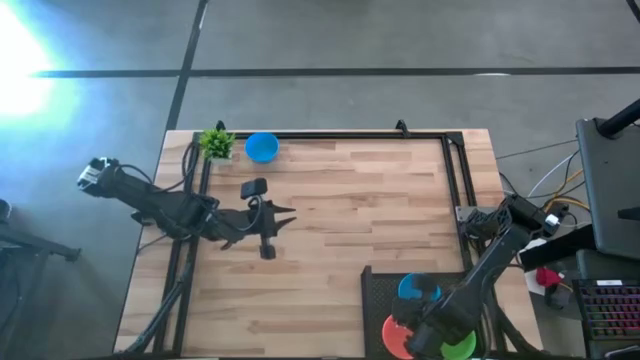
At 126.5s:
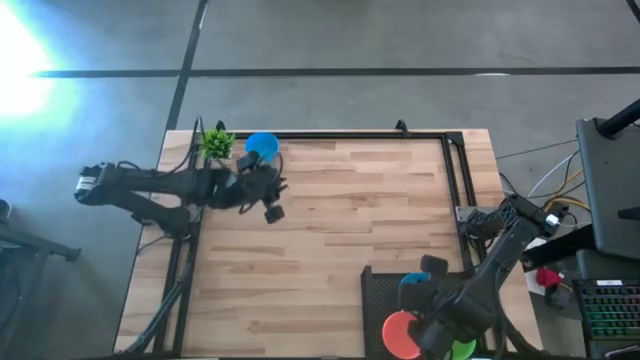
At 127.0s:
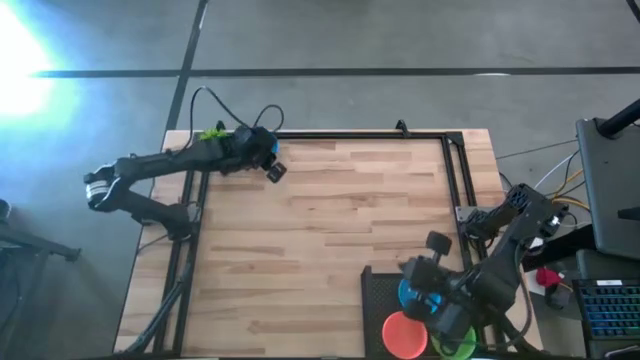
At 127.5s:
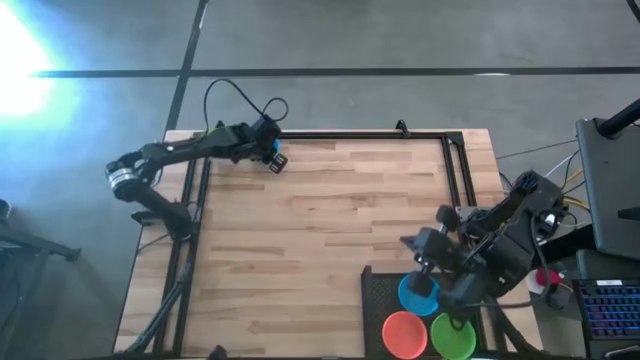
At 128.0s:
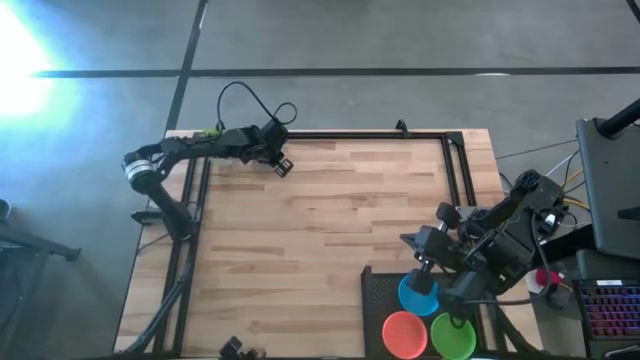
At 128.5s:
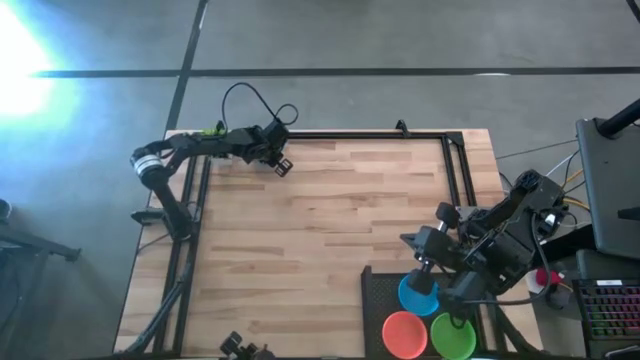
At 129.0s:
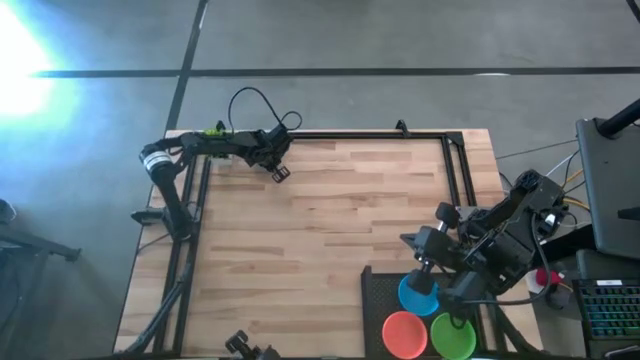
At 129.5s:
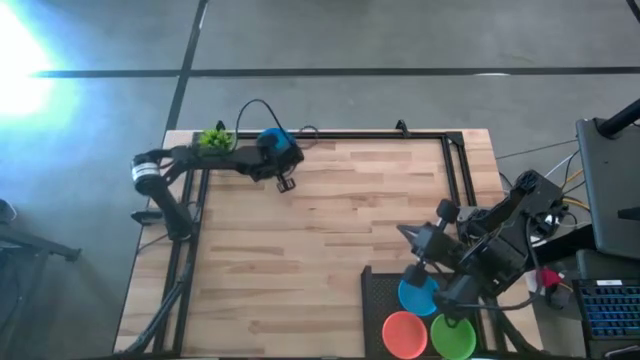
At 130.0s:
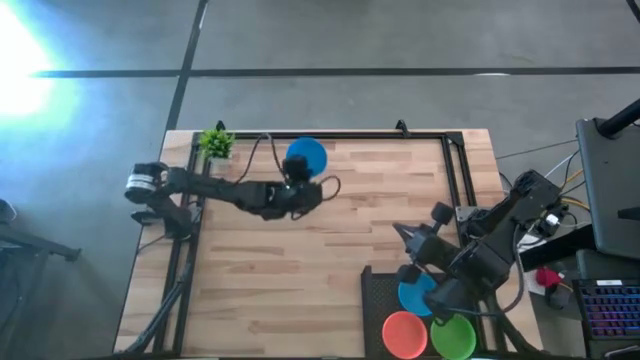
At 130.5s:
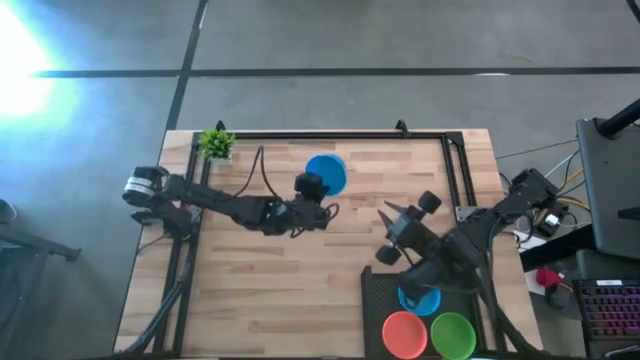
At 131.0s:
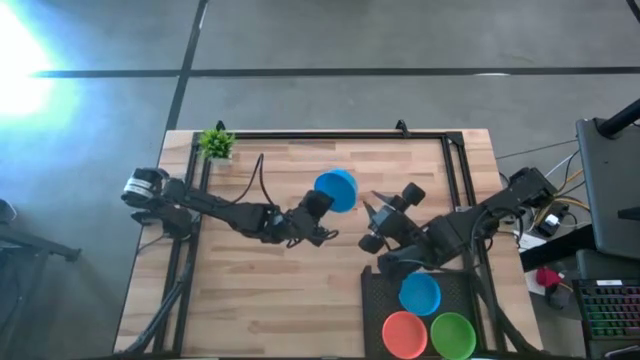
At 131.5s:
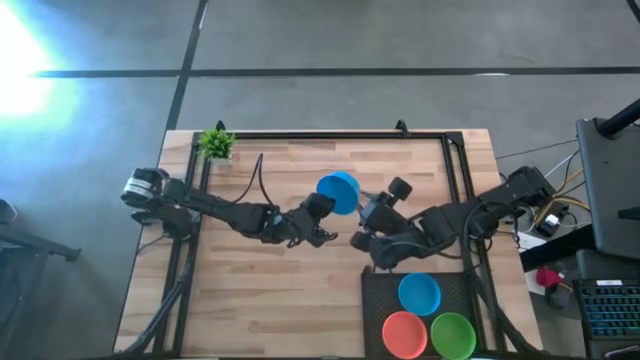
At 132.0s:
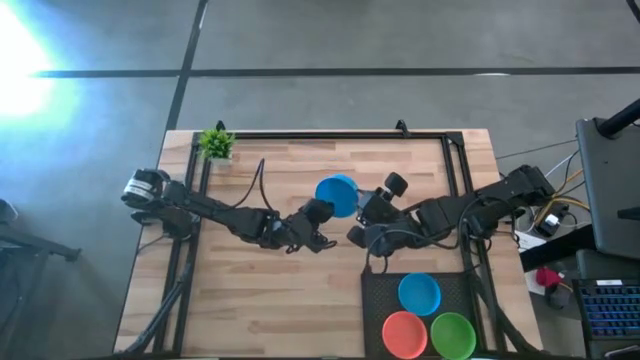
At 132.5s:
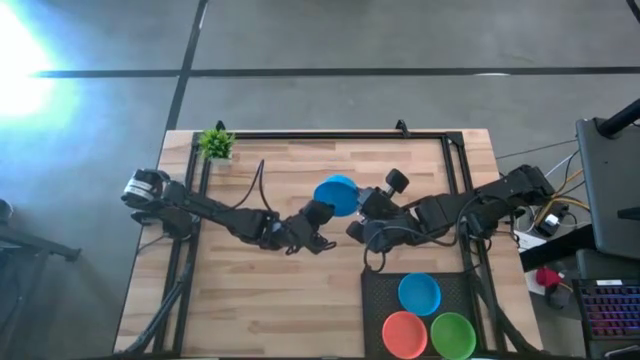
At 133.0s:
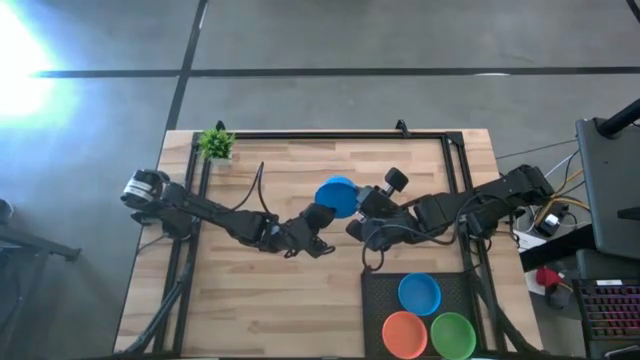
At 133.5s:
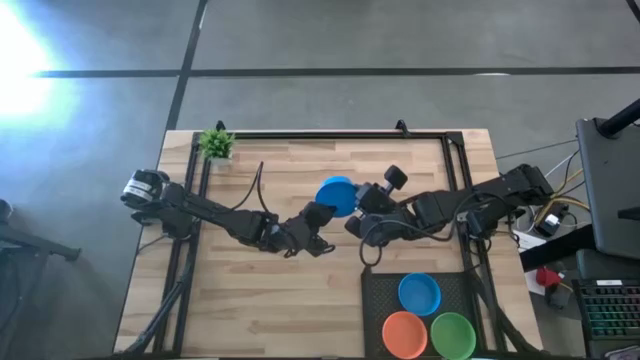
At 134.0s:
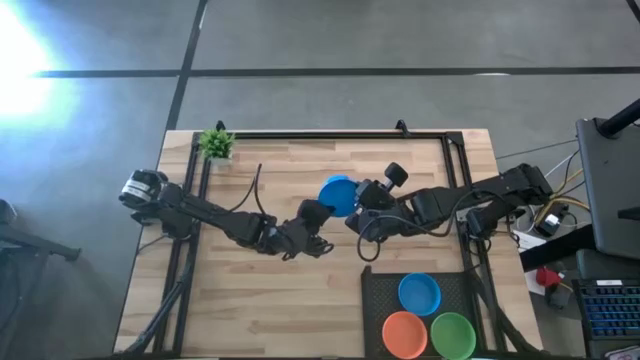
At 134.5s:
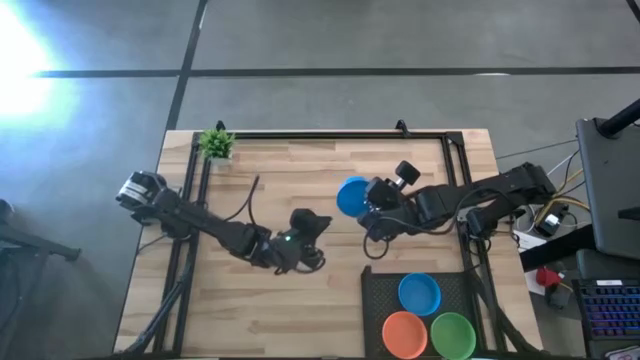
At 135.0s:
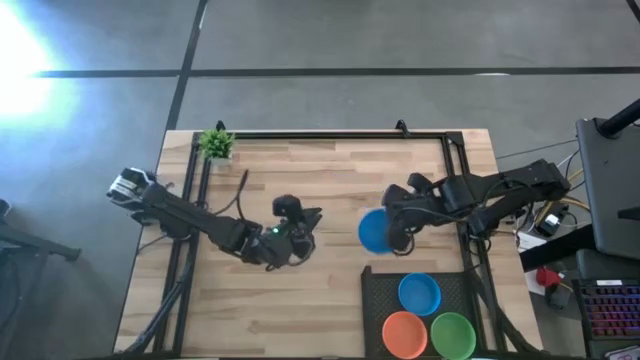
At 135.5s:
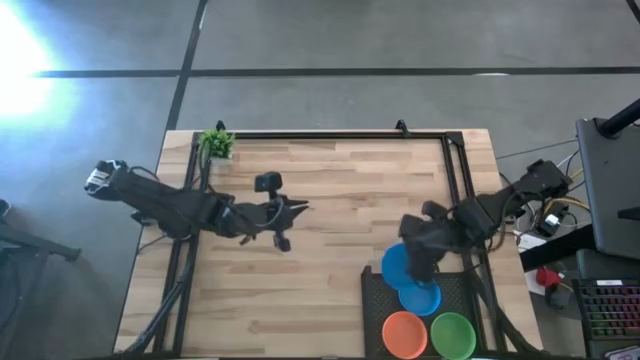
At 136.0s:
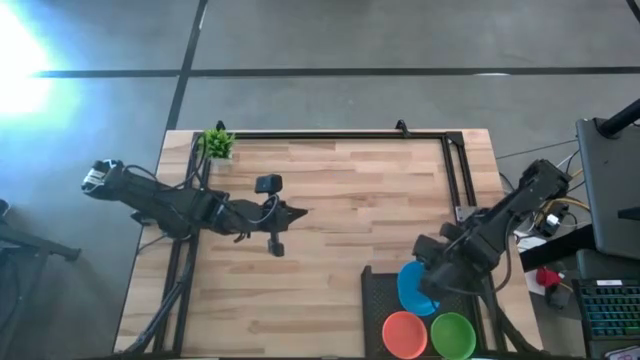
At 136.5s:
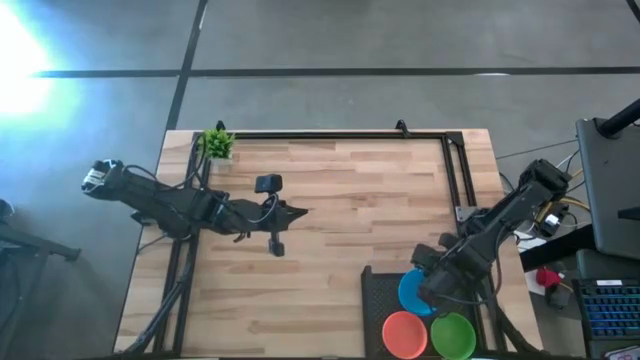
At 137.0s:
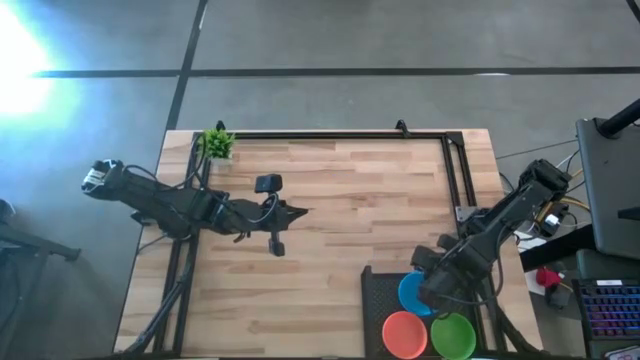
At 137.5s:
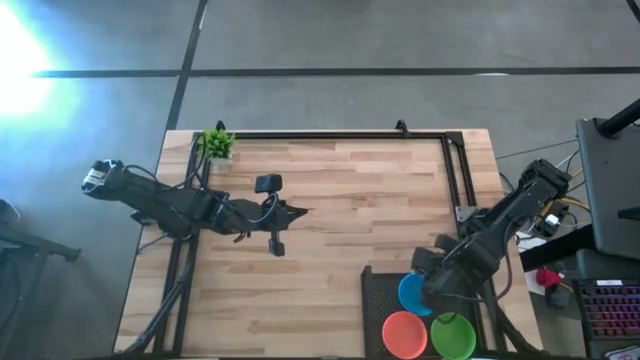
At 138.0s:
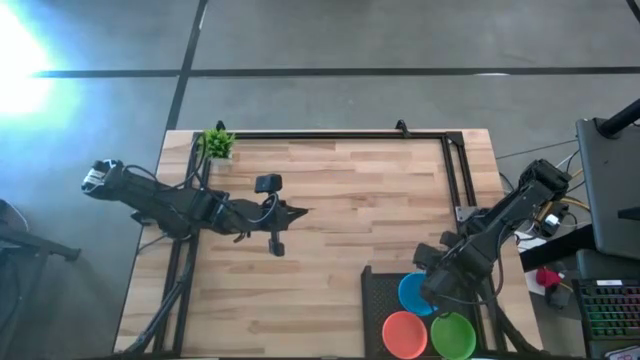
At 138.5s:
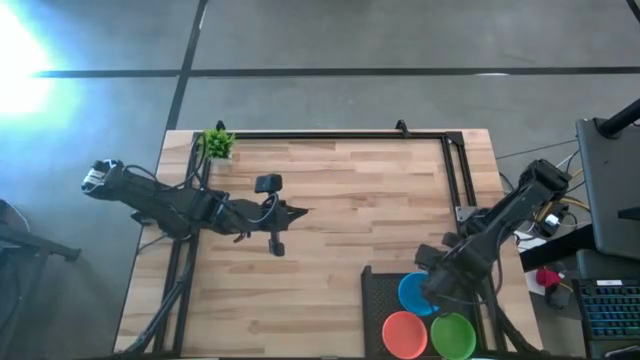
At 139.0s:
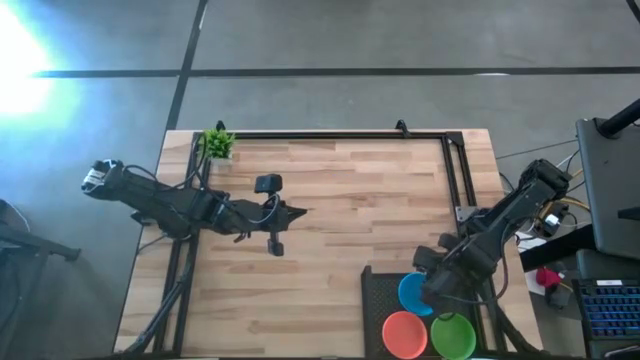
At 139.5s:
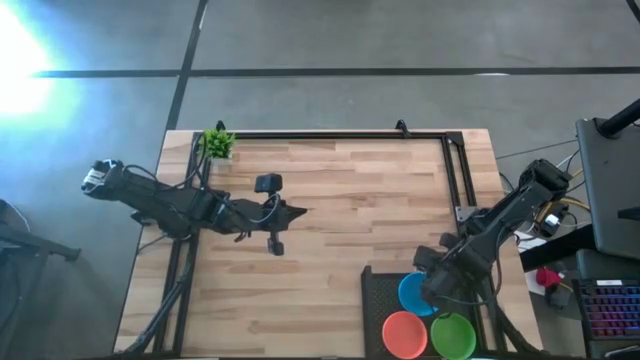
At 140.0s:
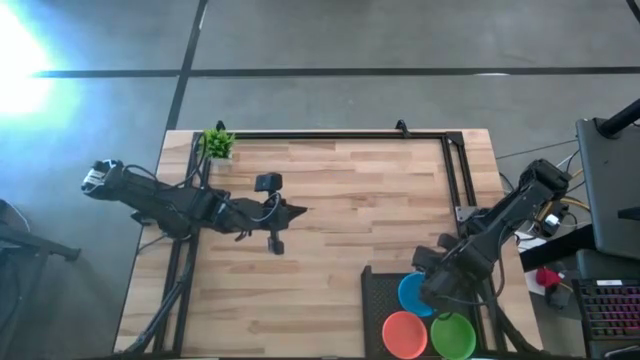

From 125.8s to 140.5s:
Task: Pick & Place Mini bowls
Stack the blue bowl on the blue bowl on the shelf

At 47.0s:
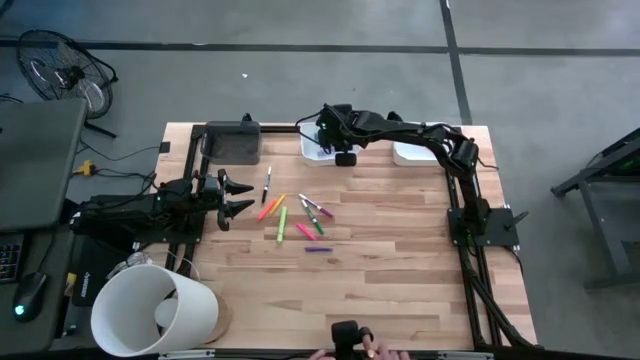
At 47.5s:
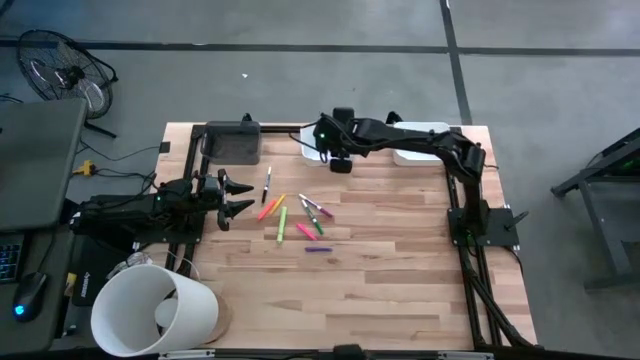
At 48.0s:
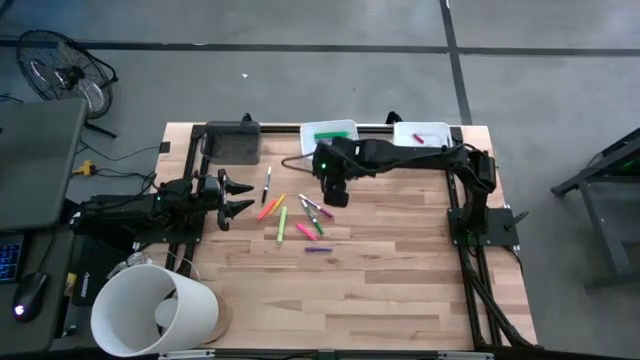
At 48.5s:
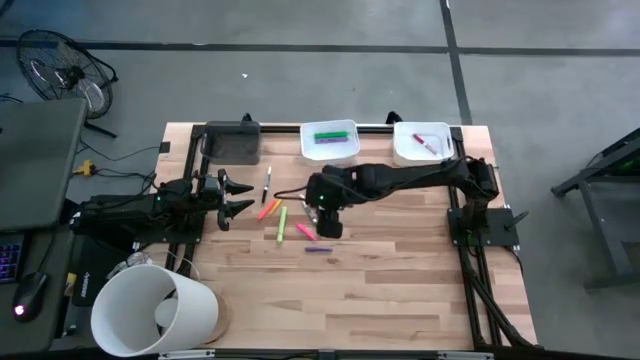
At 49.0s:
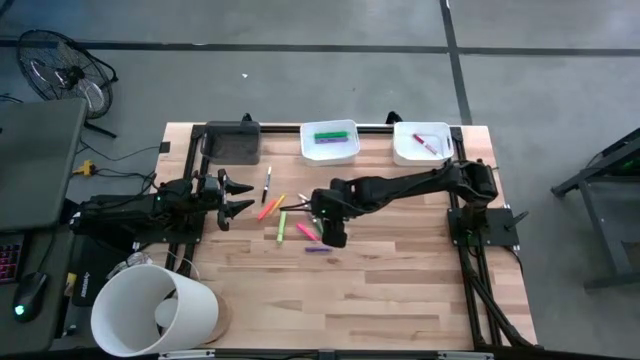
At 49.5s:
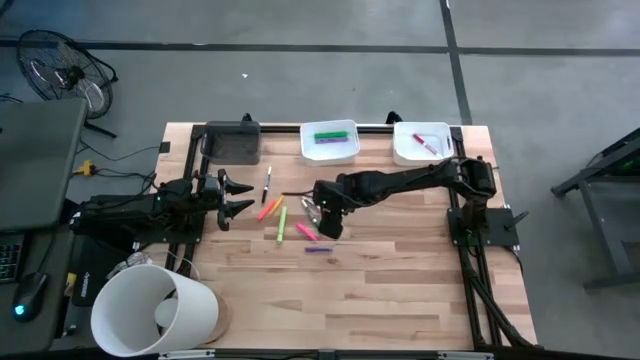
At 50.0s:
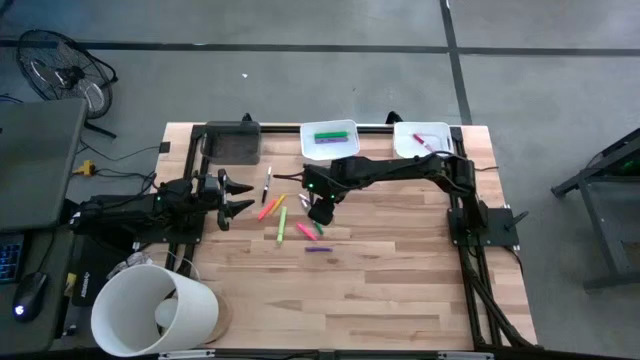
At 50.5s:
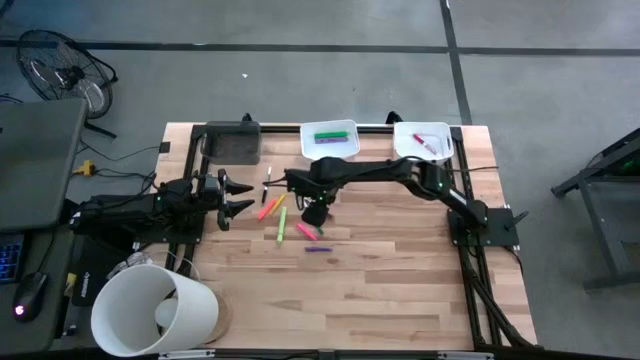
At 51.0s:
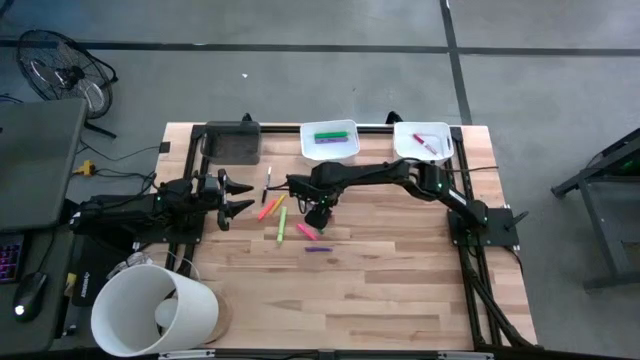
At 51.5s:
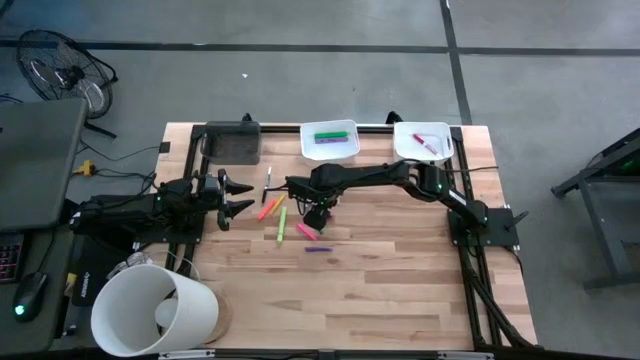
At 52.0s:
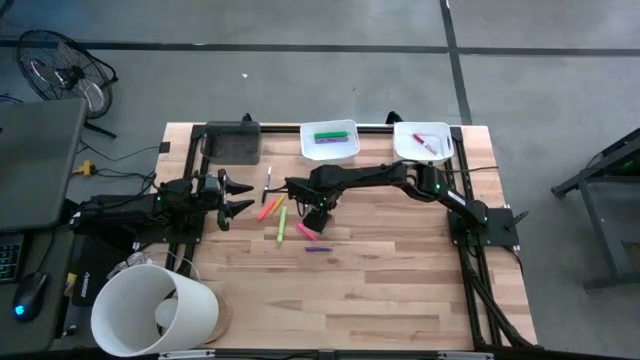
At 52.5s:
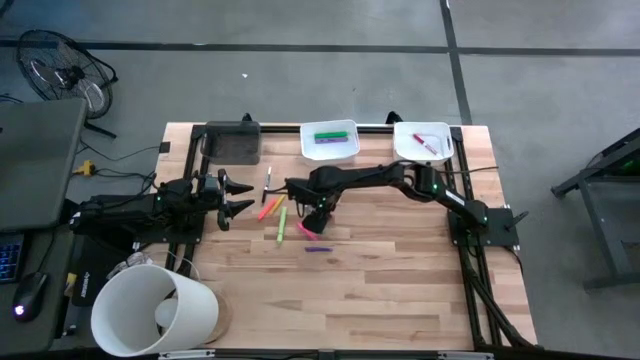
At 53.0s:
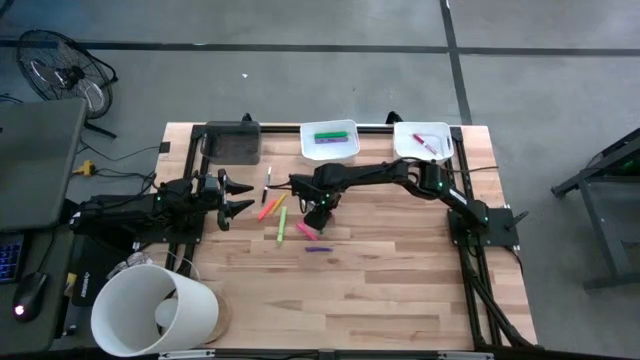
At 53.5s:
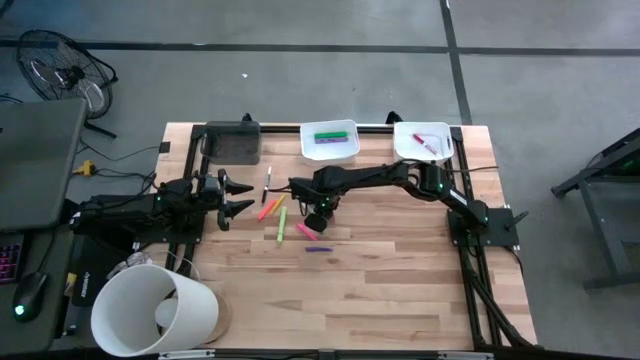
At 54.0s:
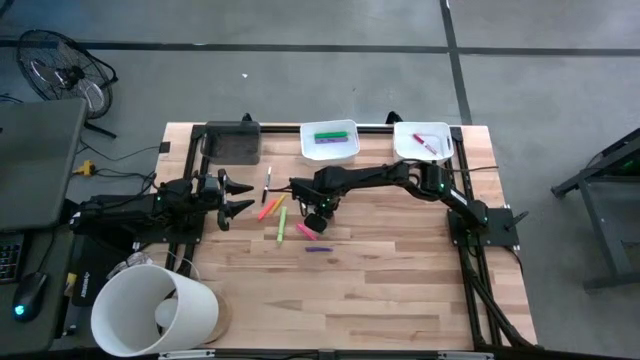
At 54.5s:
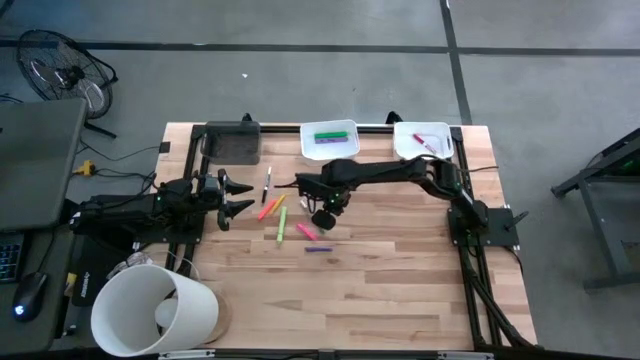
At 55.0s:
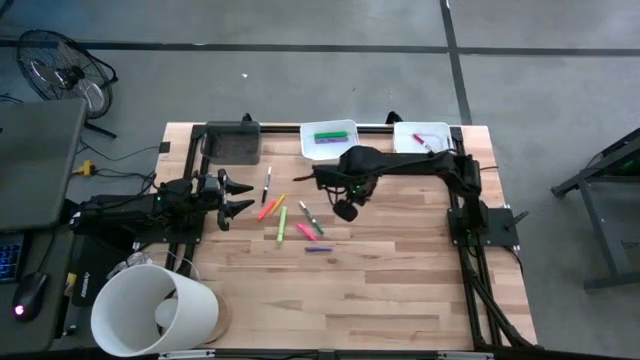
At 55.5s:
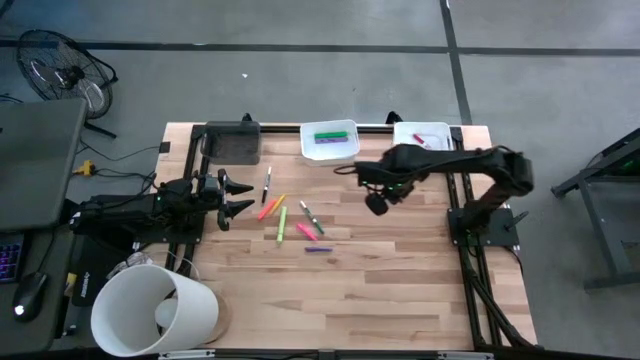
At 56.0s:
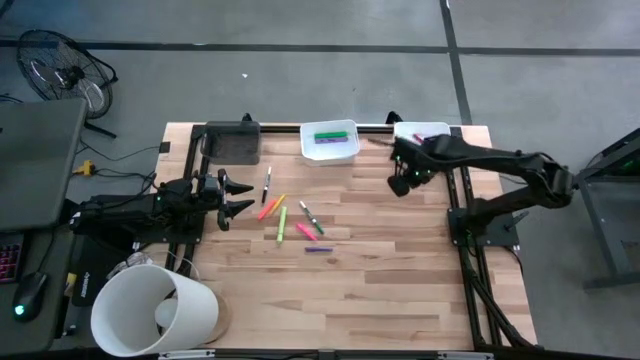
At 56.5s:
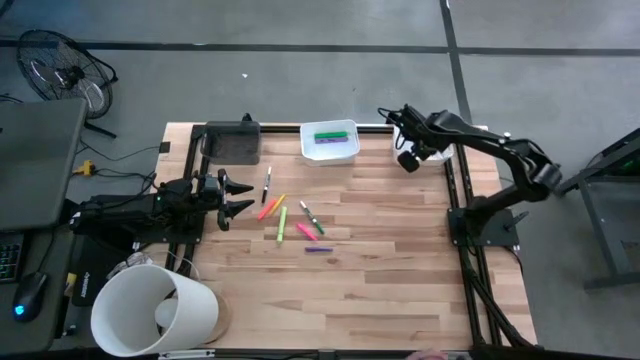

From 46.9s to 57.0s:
Task: Pick & Place Markers
Put the pink marker pen into the right white bin
